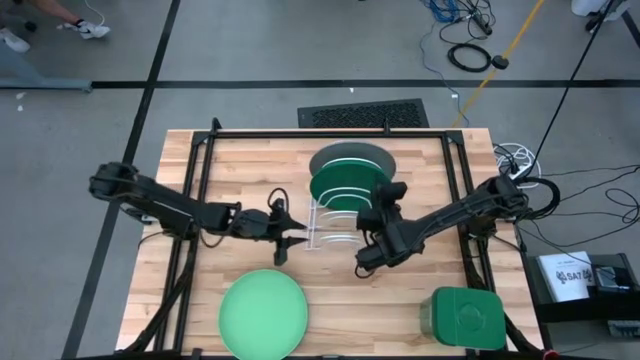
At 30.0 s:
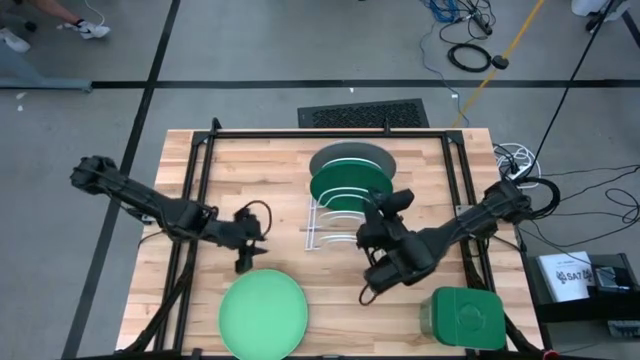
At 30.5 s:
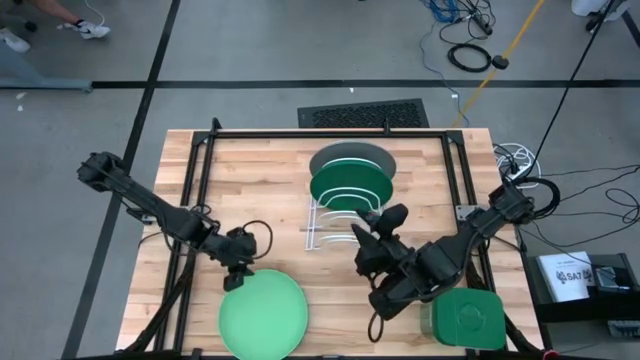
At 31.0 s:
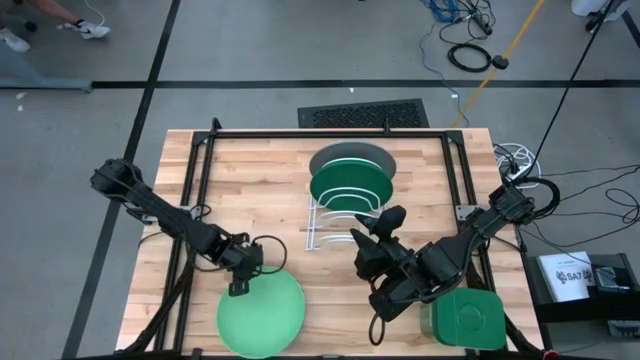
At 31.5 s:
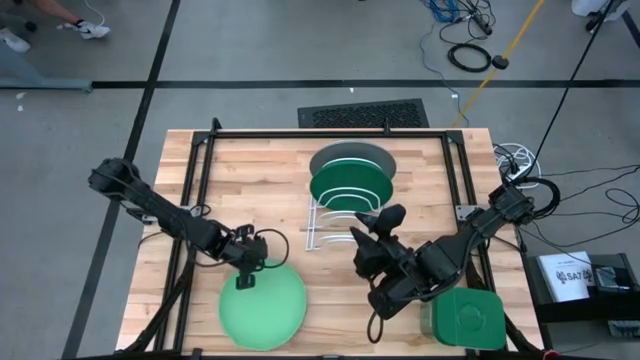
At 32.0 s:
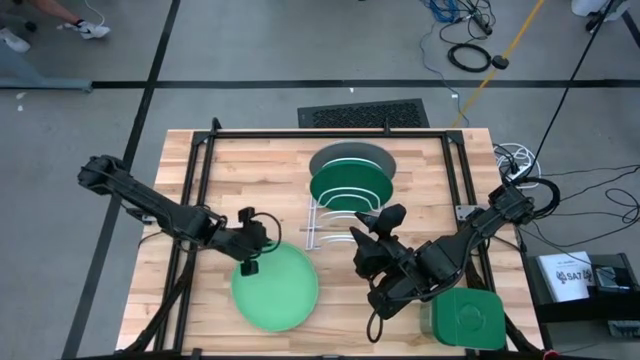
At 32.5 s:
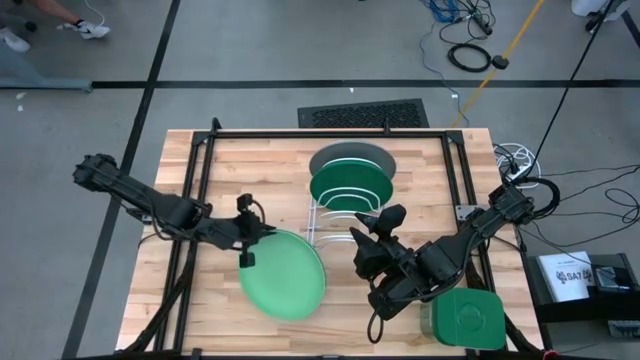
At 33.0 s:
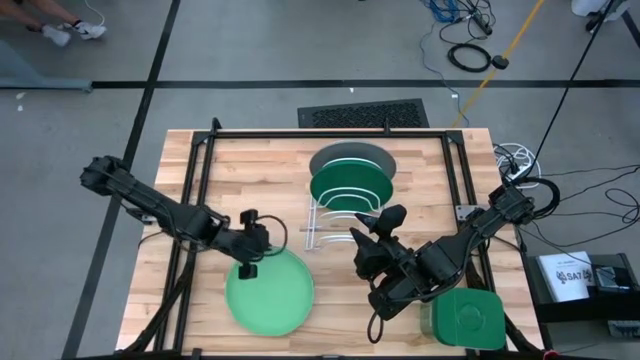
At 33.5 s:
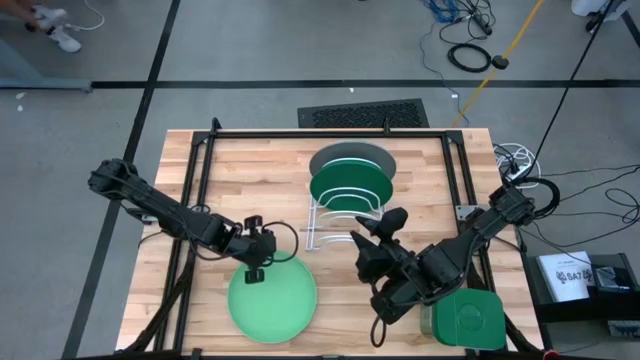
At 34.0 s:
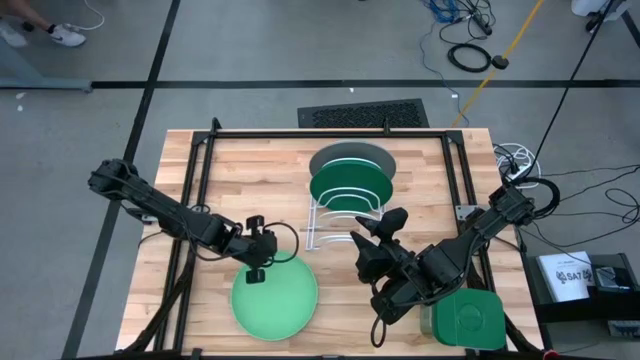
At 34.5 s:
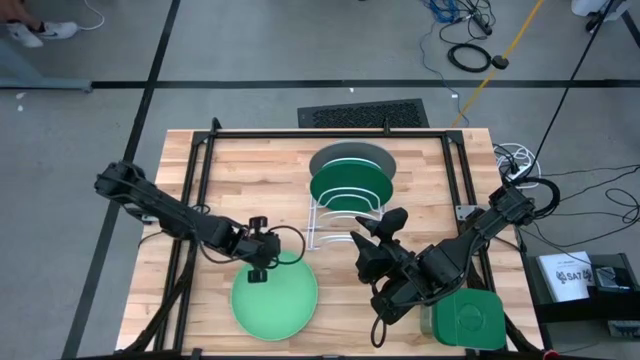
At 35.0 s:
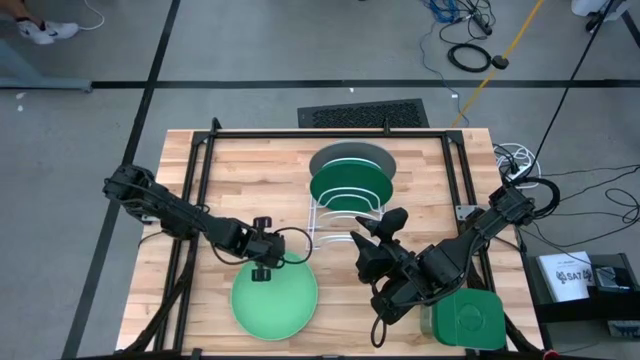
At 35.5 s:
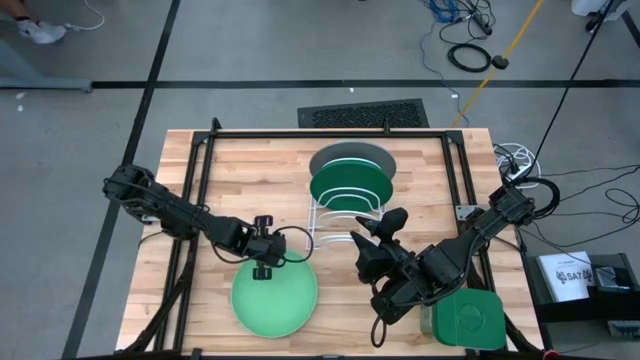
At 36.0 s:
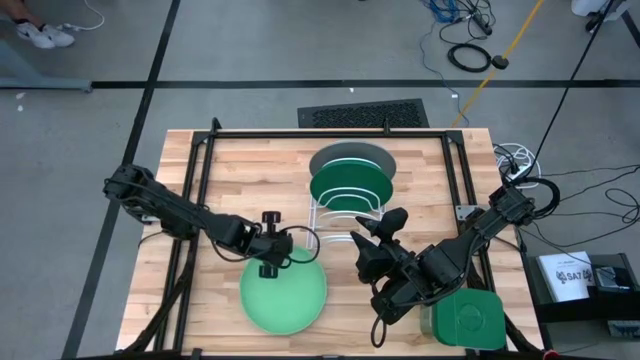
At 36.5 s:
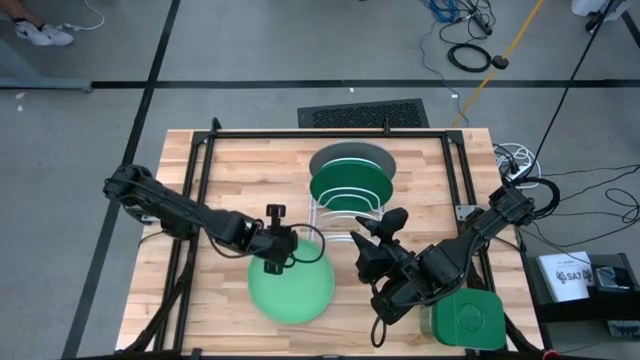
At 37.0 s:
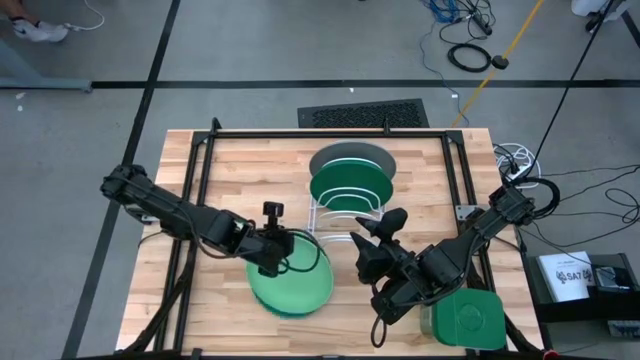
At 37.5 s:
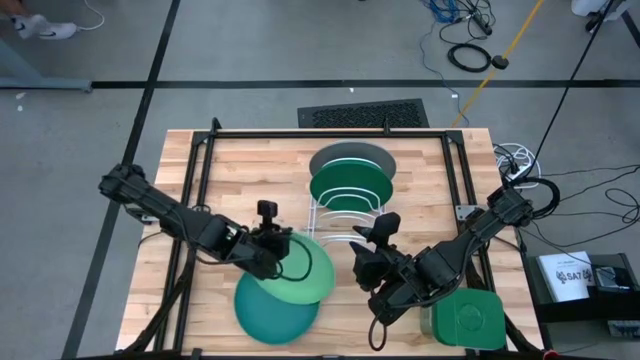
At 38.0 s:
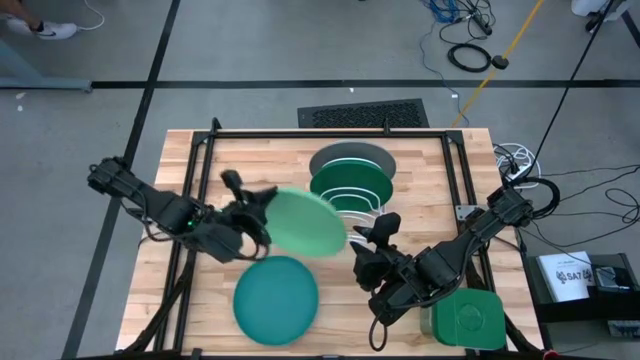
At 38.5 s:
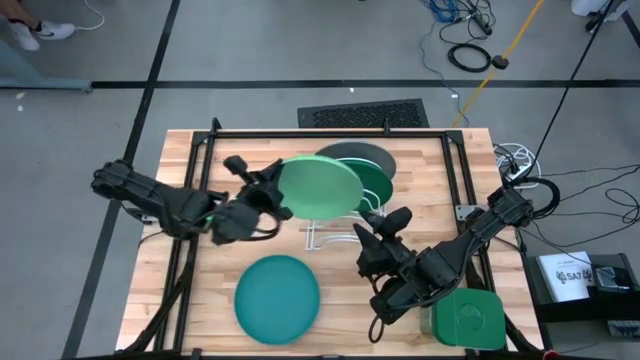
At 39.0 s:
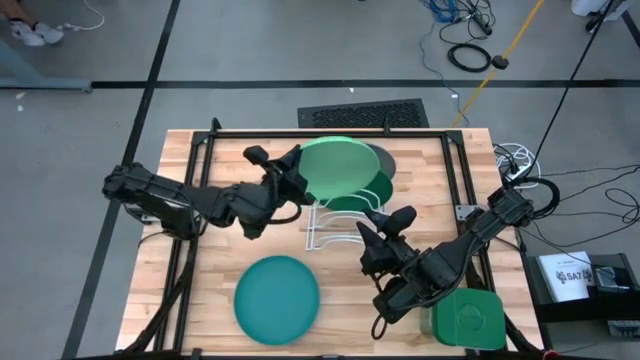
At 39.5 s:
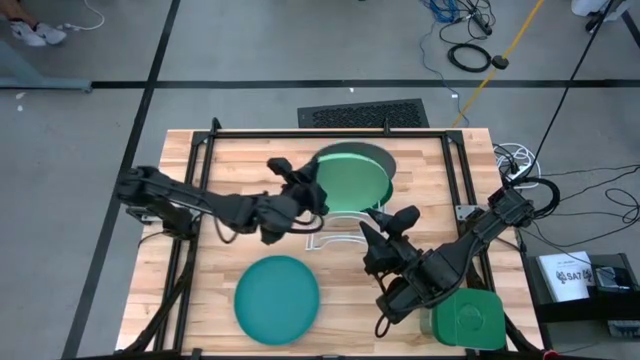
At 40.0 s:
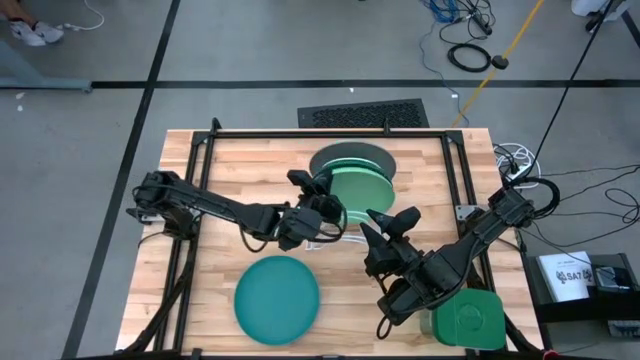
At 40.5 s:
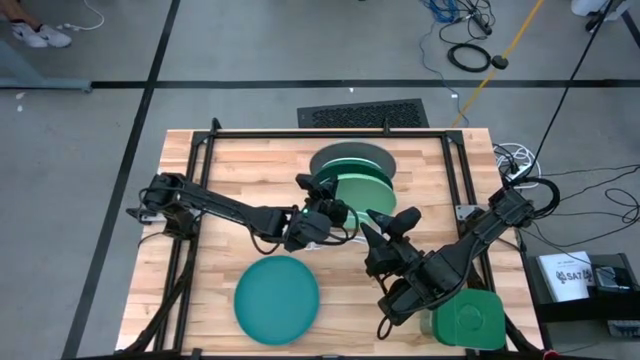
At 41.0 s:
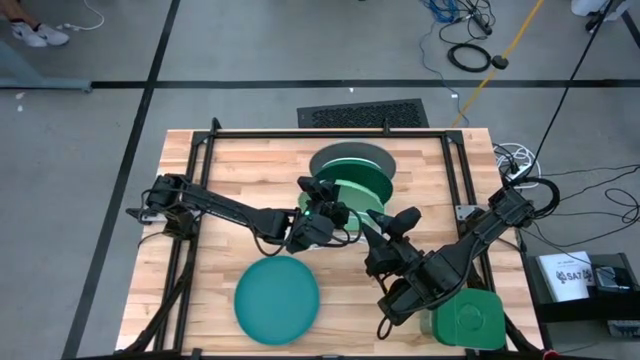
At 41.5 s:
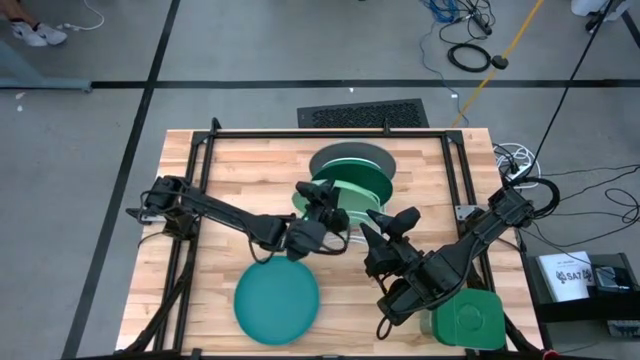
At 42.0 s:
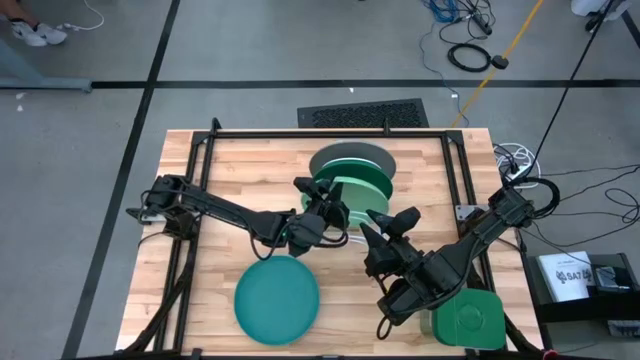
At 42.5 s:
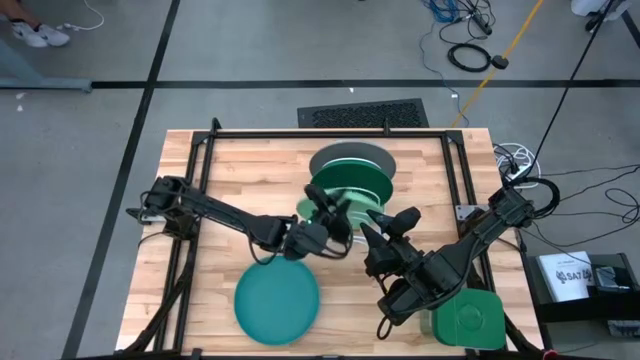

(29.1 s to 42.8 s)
Task: Sort dishes
Put the light green plate into the dish rack

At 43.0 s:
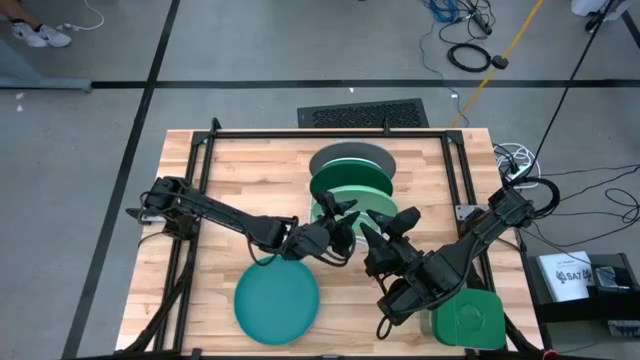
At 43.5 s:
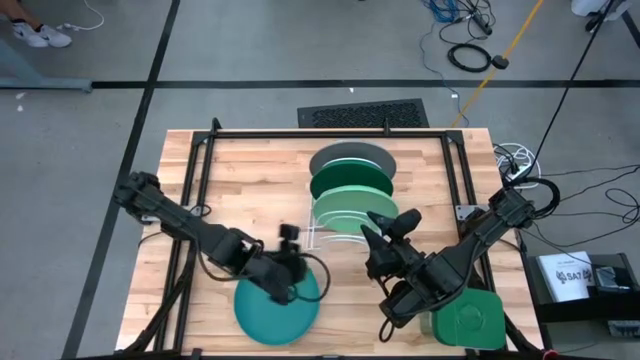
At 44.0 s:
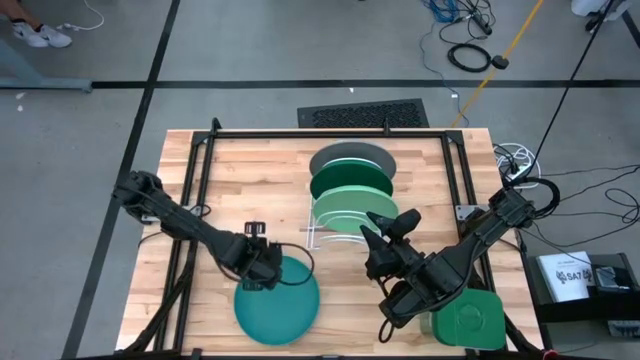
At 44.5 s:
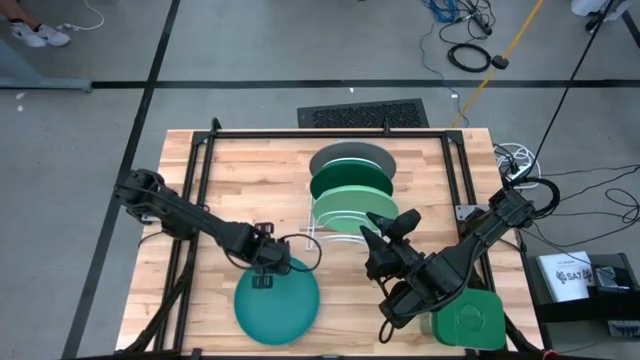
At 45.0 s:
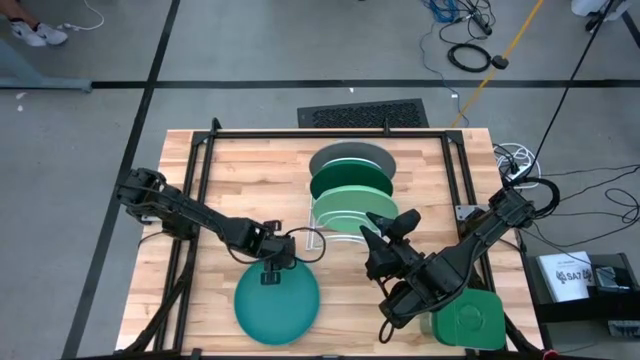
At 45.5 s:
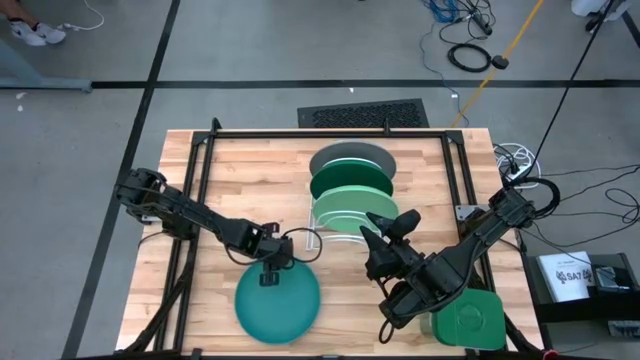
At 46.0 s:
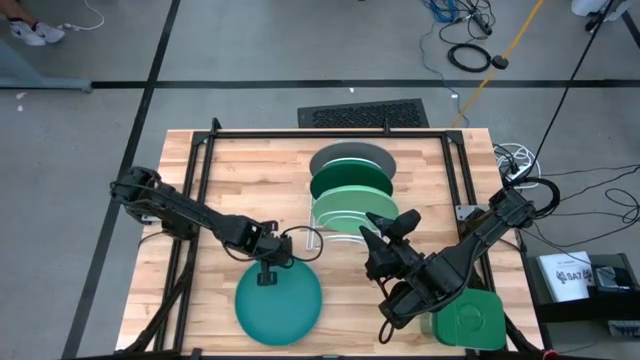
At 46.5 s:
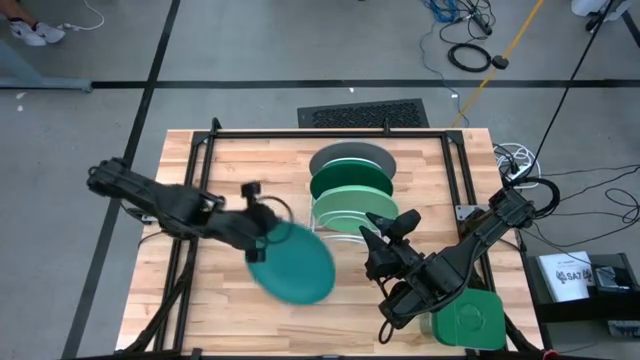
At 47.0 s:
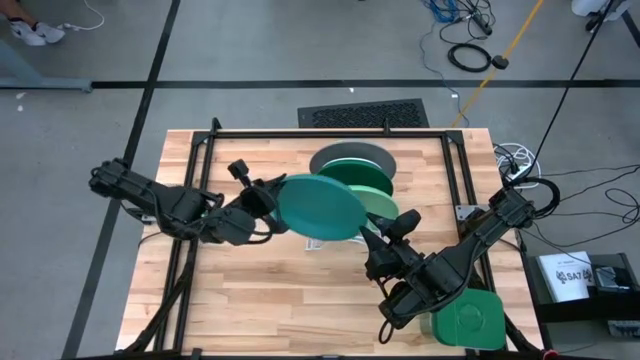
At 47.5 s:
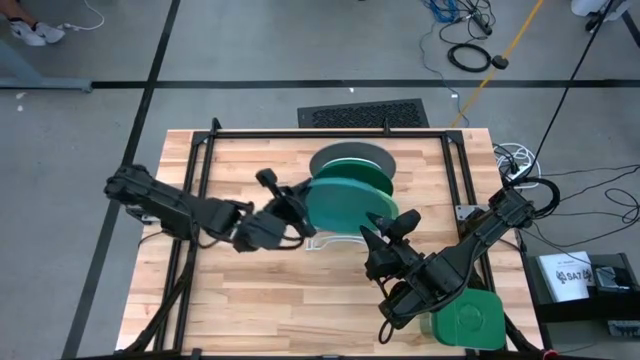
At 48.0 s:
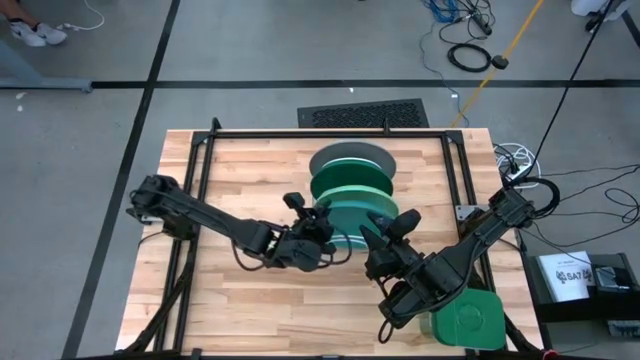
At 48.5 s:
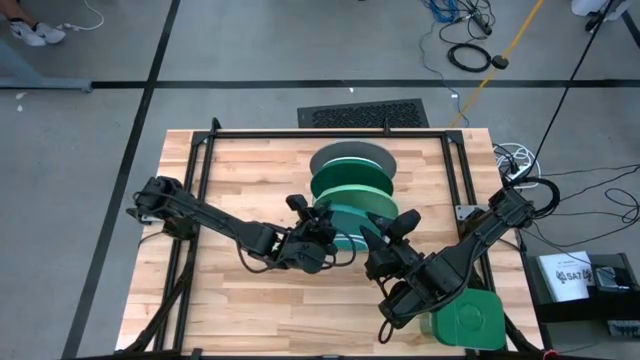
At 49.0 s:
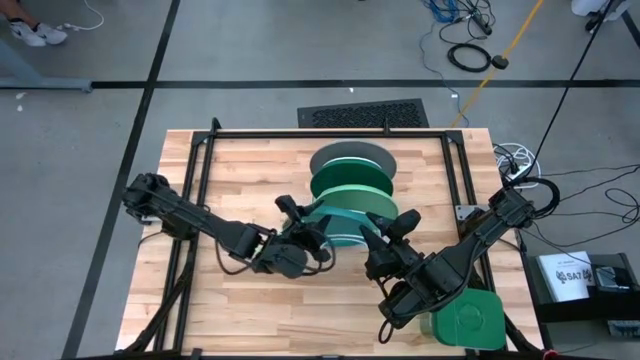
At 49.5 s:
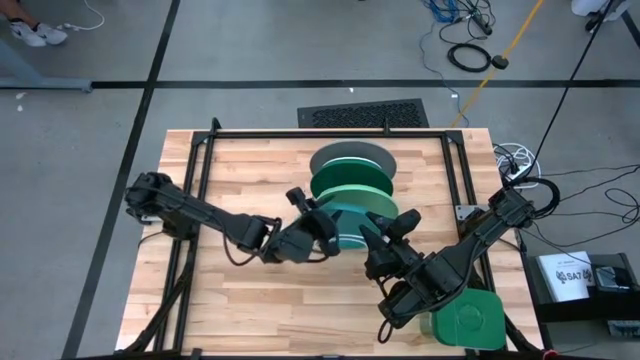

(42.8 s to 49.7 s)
Put the blue plate into the dish rack

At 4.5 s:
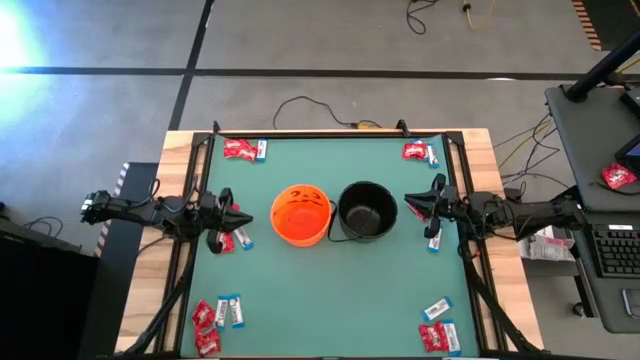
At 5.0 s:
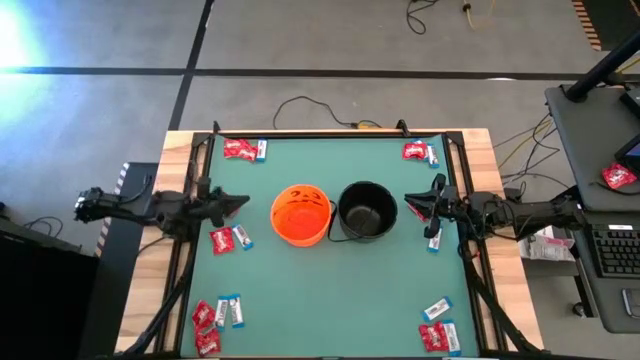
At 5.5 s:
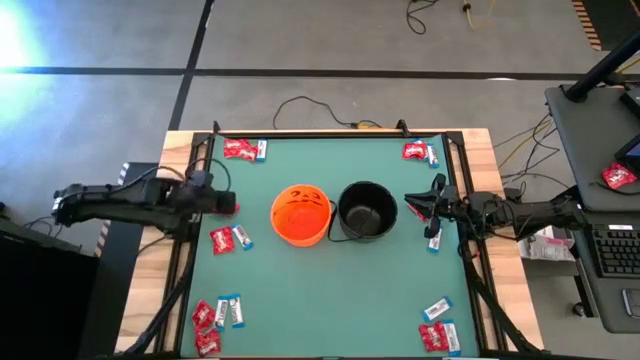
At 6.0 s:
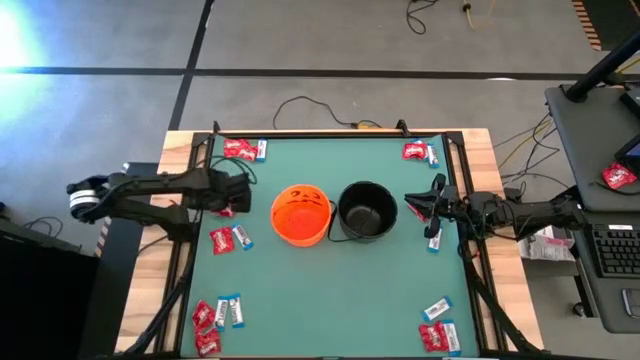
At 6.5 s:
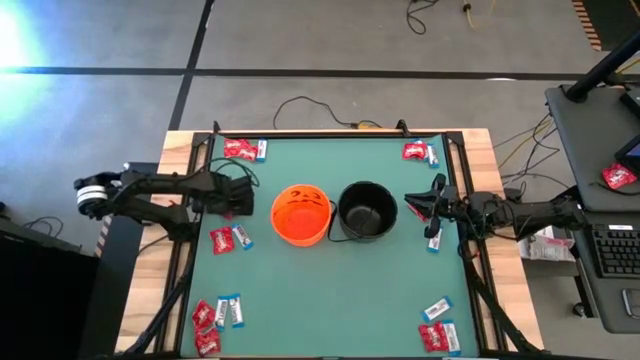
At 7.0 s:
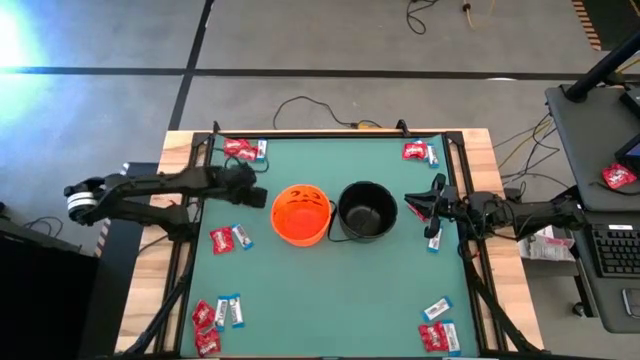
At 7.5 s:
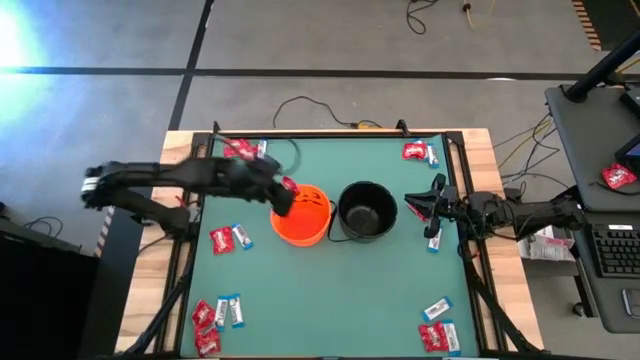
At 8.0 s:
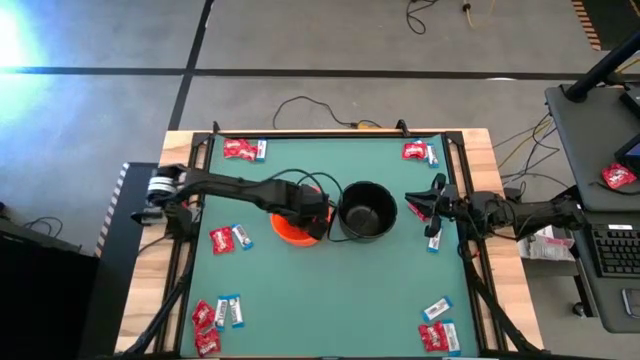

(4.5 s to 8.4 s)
Task: Sort candy by brand, put in halloween buckets
Put the red candy into the orange bucket
